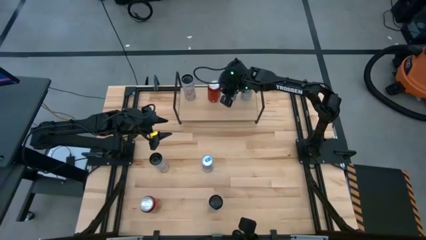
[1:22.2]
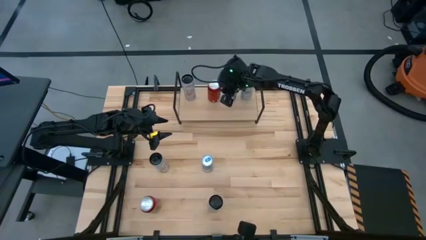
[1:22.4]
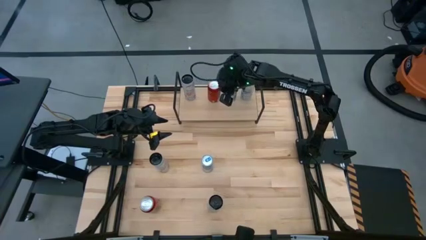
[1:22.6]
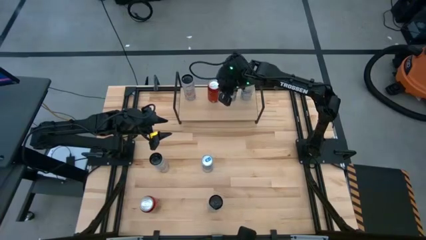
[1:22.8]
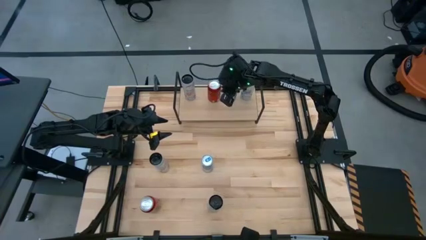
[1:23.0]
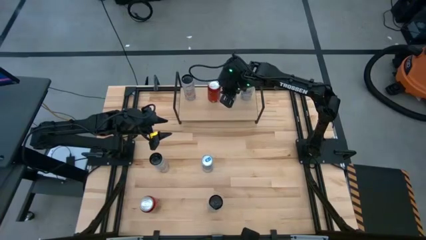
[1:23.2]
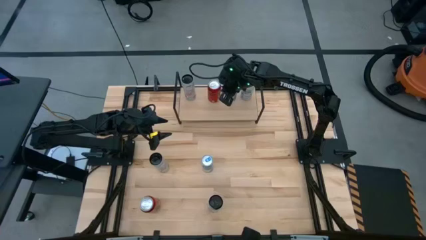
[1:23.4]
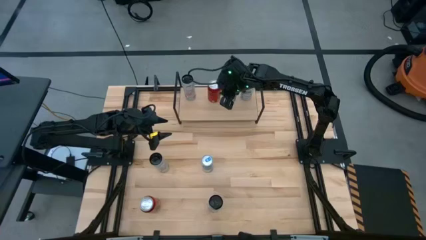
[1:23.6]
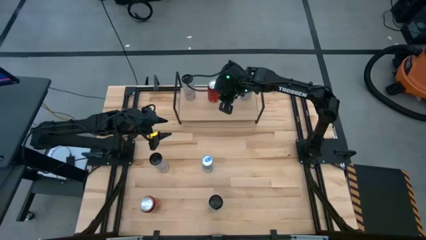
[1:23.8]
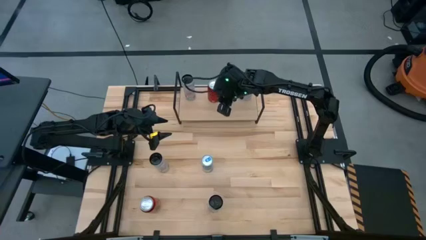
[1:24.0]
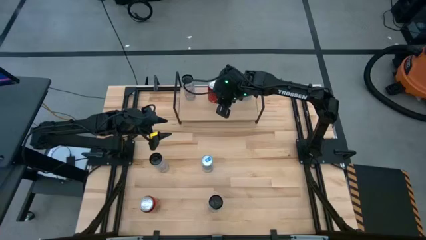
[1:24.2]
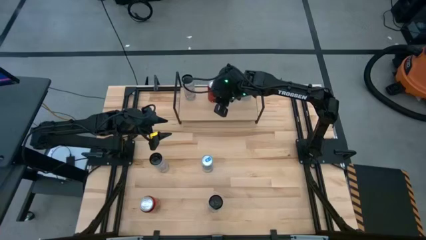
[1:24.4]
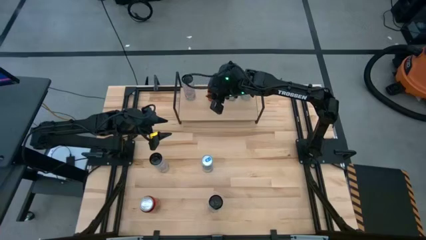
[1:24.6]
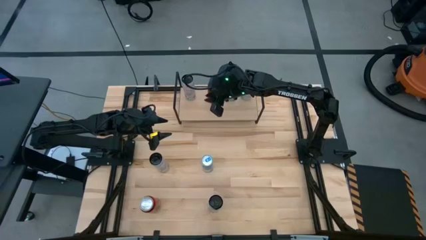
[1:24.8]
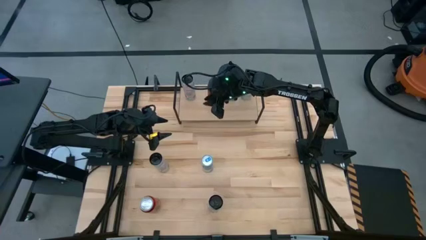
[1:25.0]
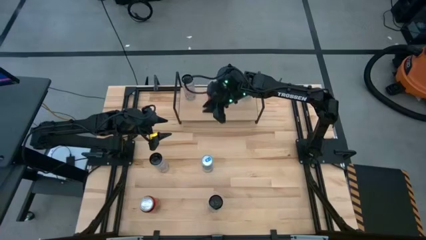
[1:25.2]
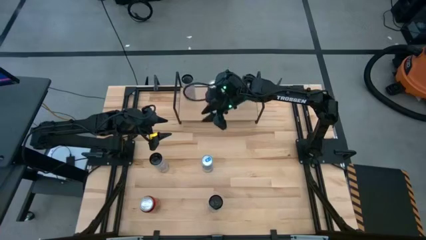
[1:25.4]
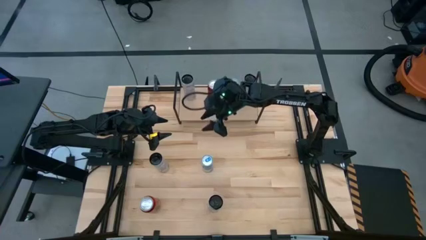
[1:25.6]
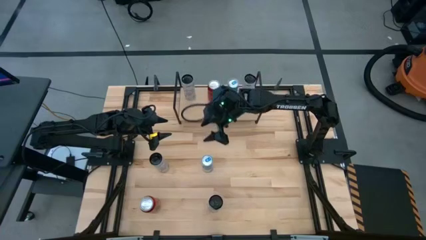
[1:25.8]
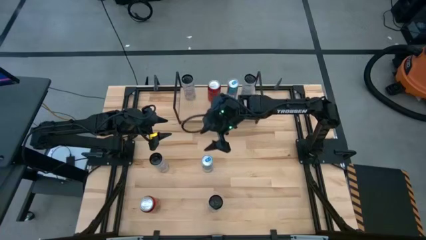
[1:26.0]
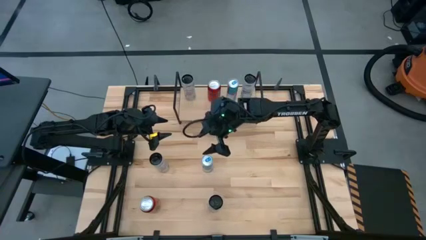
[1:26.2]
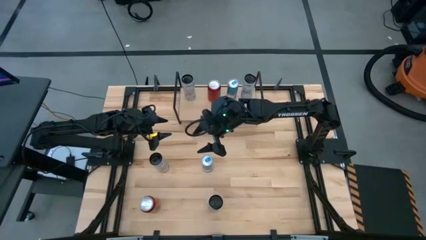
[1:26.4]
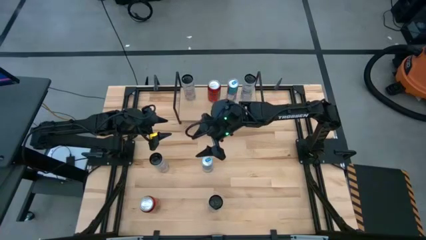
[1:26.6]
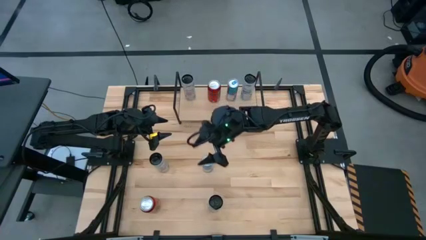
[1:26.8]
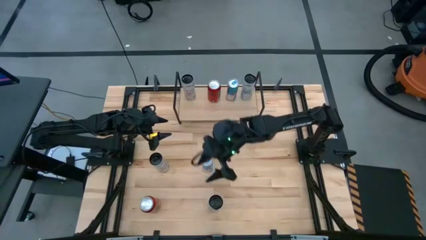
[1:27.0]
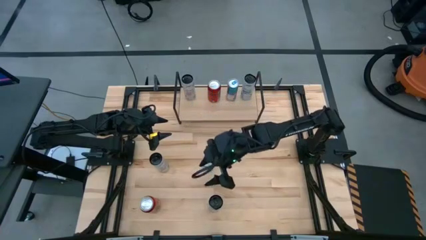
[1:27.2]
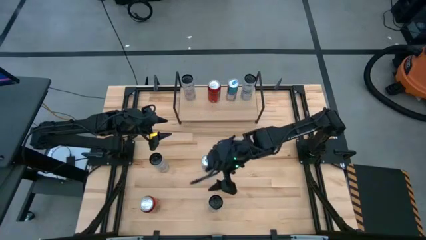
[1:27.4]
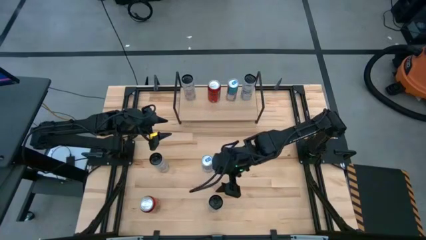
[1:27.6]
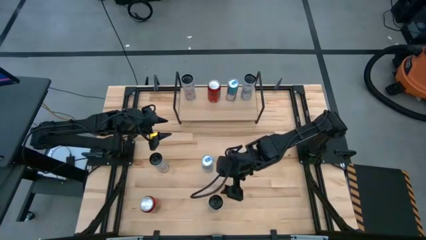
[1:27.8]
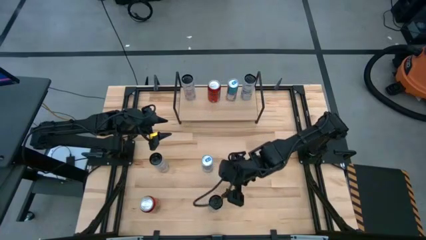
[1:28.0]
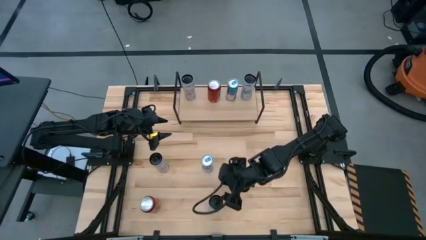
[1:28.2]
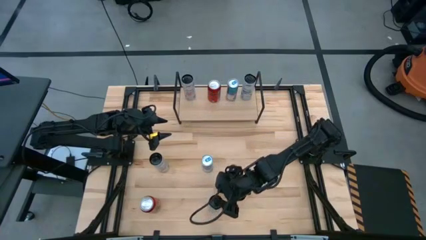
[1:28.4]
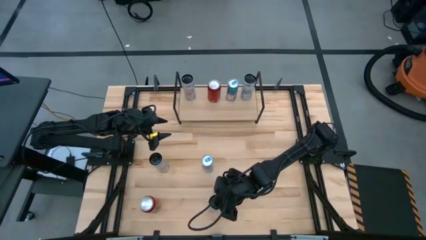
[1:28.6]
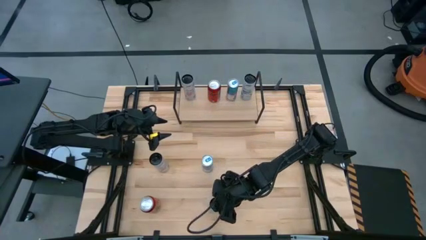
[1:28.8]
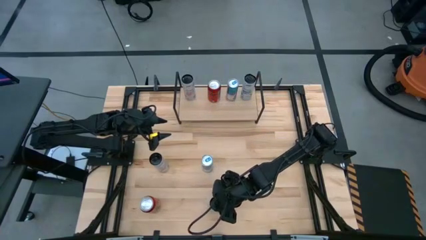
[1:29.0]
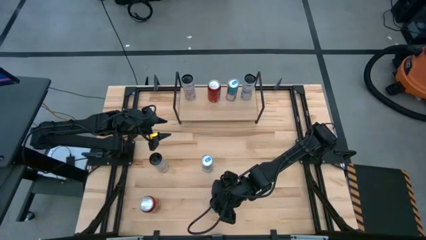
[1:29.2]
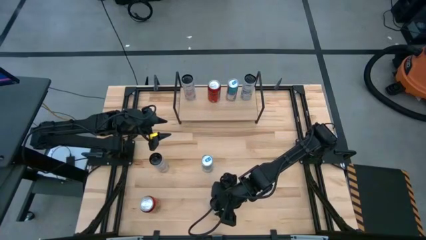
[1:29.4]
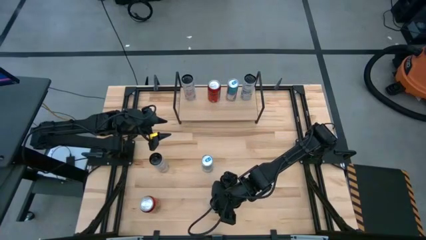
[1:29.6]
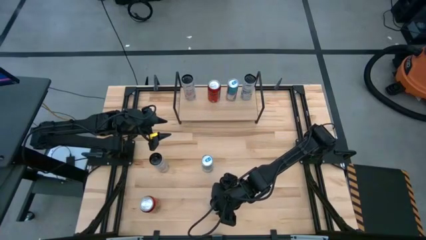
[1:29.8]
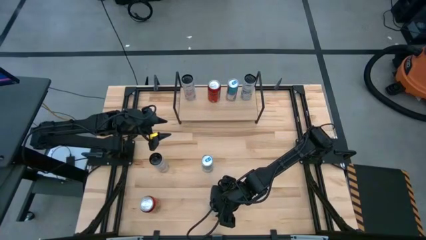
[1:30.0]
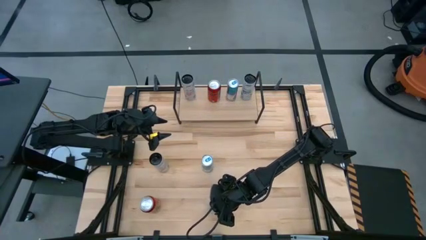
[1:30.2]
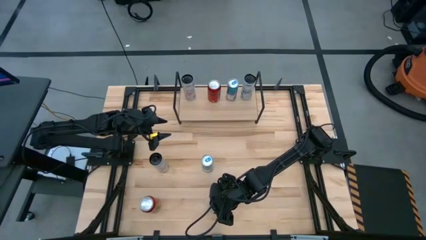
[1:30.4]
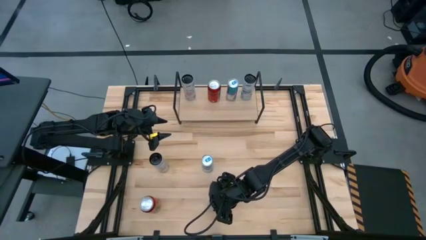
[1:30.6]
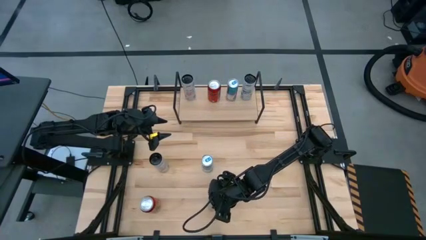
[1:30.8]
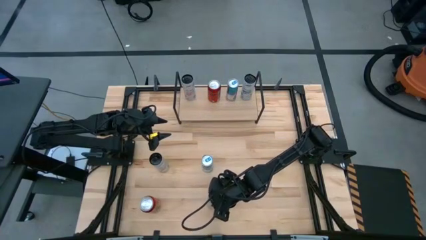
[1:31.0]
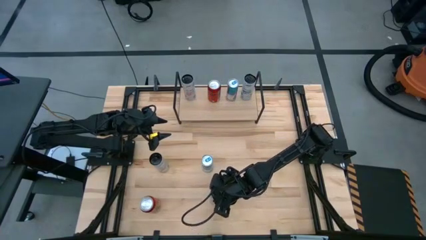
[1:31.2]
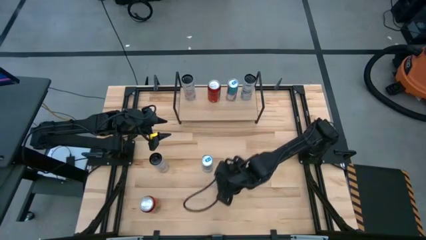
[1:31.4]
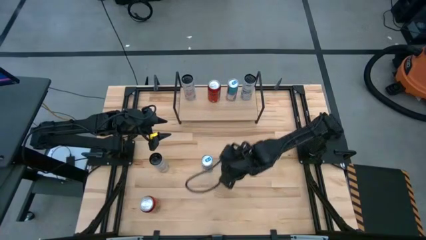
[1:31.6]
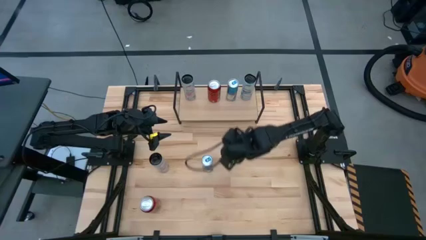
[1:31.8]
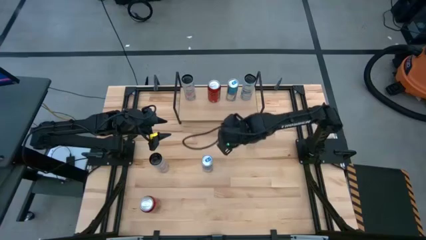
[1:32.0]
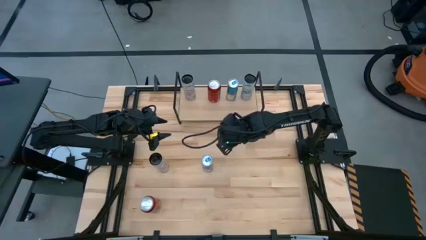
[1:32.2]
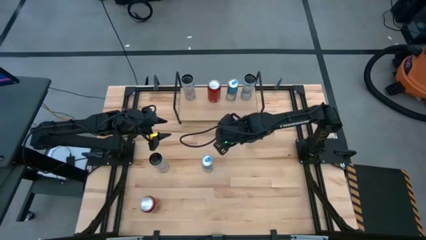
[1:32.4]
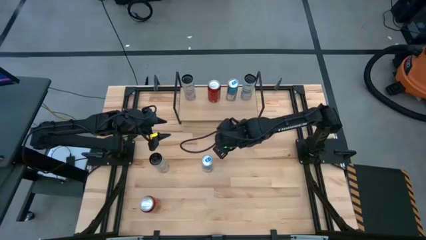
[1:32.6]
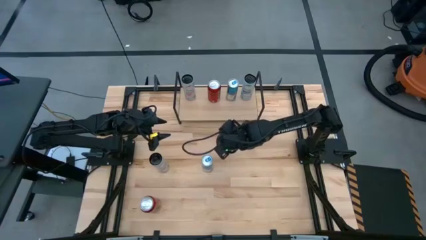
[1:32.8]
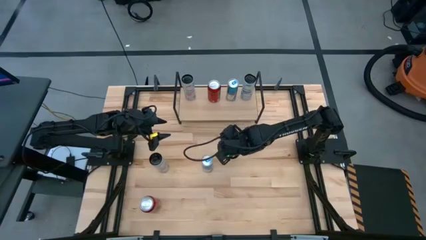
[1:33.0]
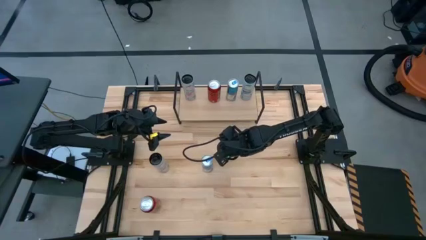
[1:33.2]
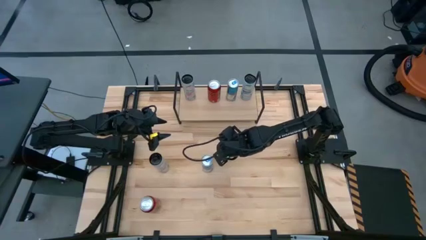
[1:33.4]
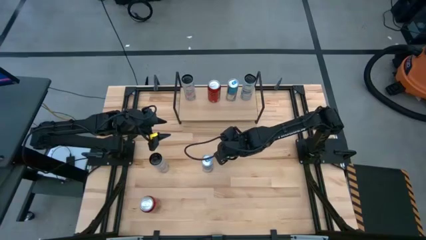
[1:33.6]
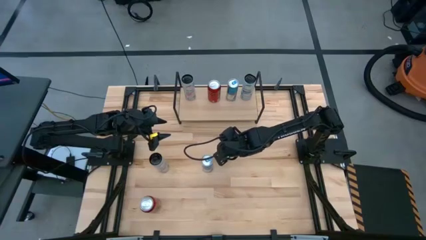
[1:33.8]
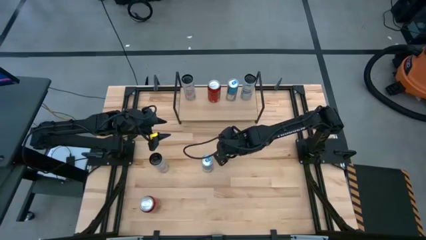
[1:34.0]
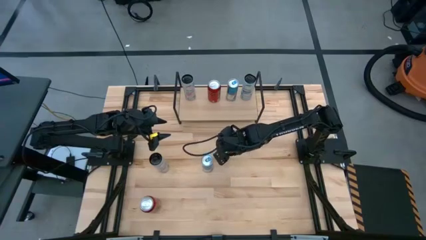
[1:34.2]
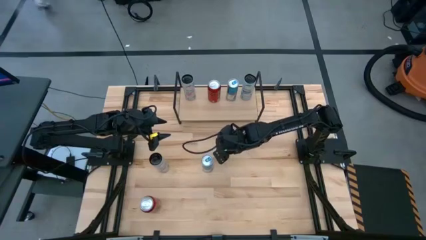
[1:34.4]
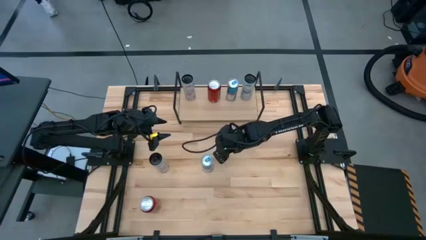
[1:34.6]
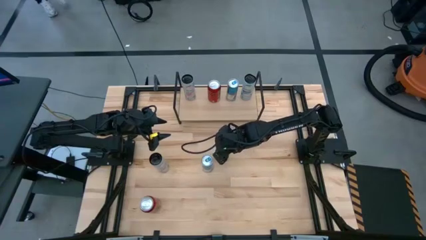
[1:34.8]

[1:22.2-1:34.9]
Task: Place canned beverage on shelf
Put the white blue soda can on the shelf aligned with the other white blue soda can

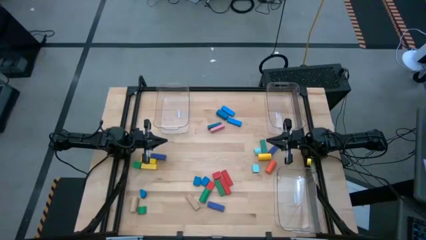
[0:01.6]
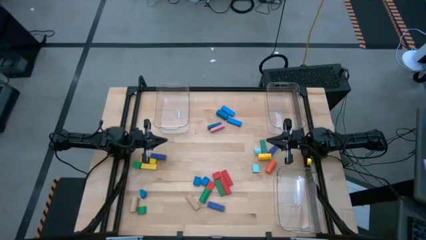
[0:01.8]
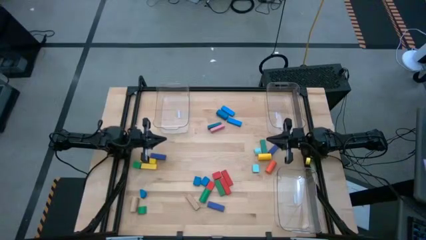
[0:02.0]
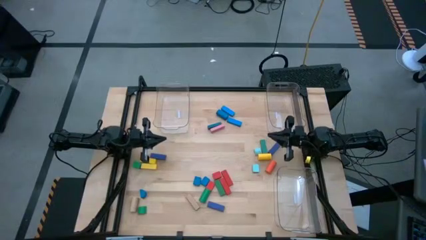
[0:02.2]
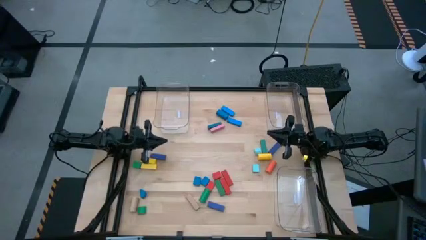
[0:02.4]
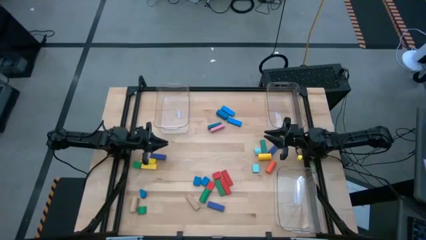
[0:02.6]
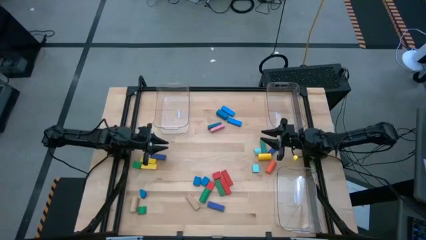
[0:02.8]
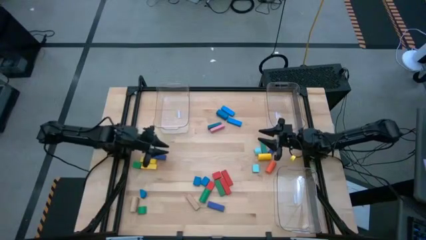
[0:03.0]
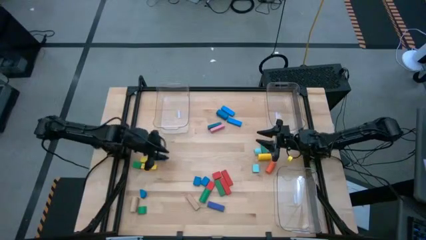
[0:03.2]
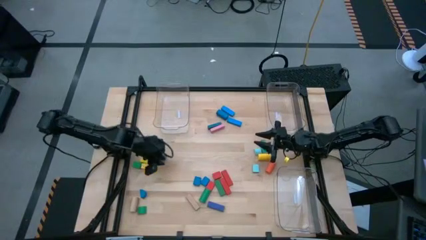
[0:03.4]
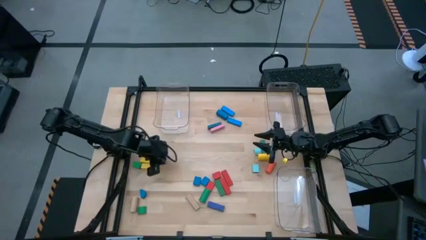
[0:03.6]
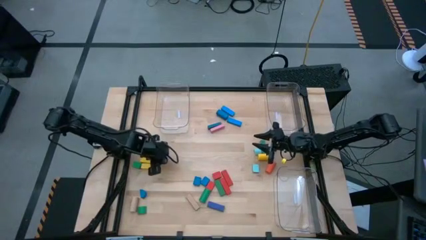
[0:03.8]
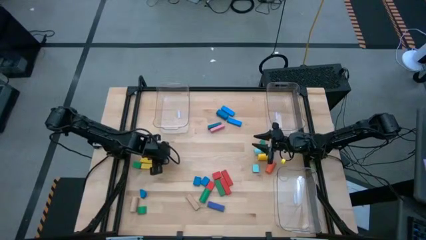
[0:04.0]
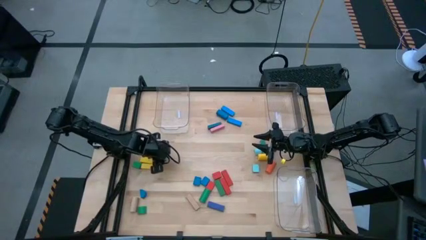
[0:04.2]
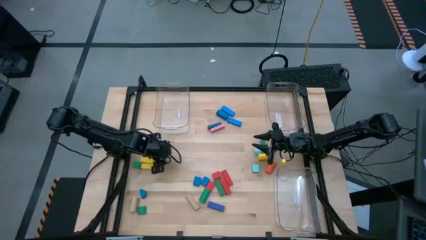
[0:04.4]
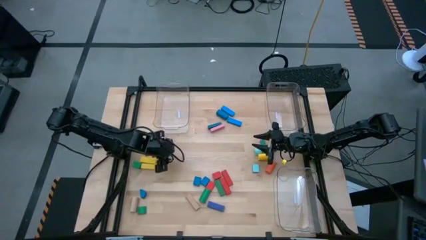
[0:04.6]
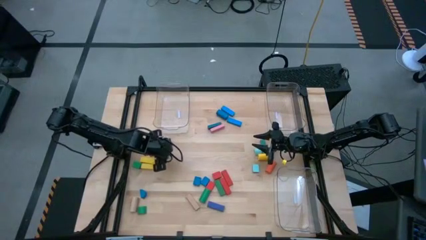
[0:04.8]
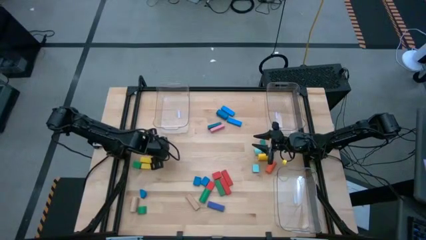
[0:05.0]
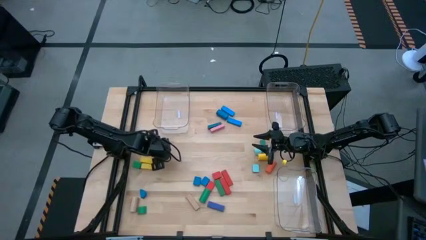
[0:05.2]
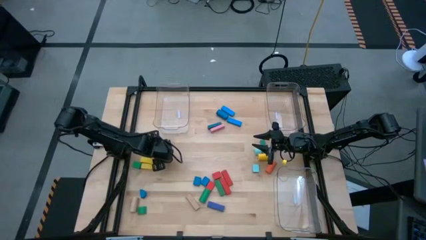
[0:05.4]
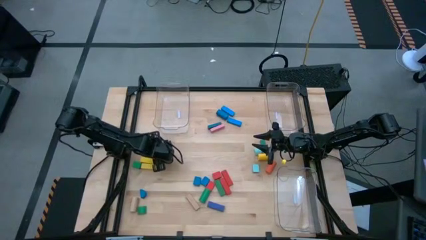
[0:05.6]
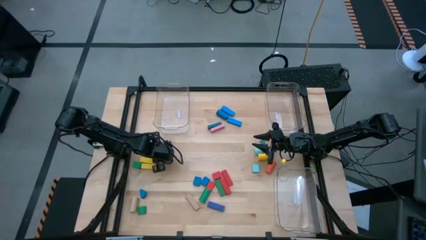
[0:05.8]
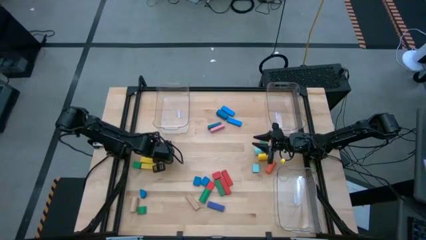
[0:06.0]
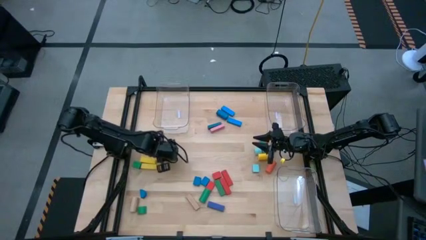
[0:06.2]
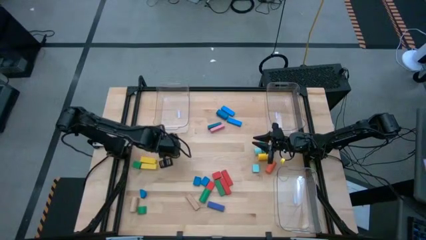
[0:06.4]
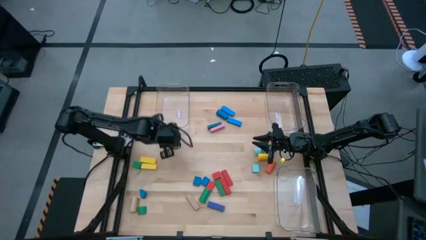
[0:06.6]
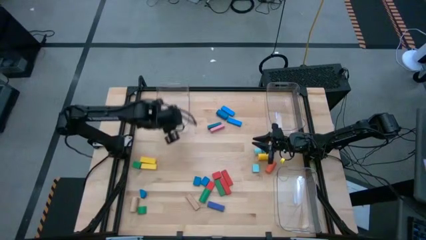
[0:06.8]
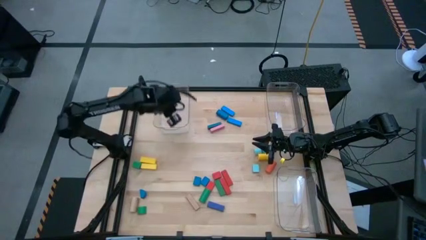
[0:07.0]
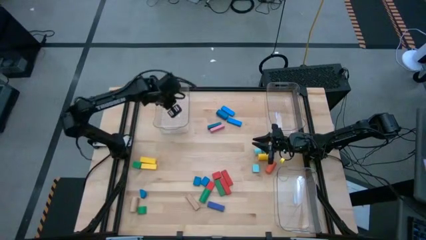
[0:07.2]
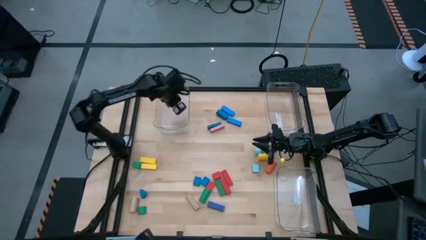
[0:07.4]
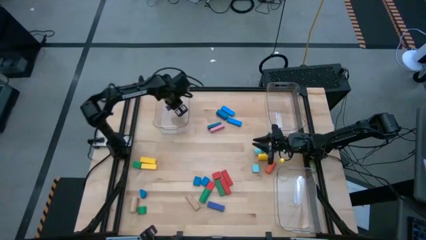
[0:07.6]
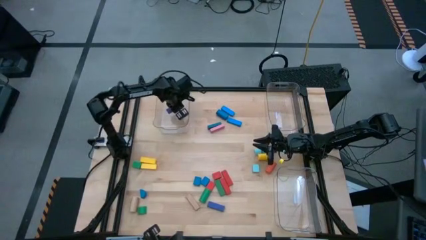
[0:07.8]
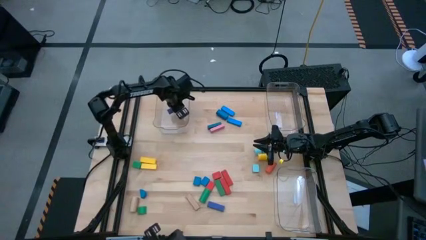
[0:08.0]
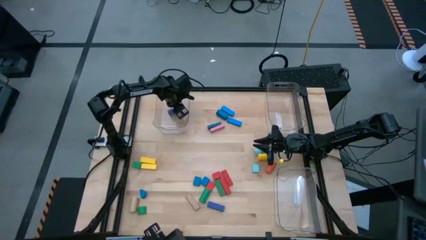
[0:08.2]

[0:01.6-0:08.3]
Task: Sort blocks by size
Put the blue rectangle block into the top left transparent bin
